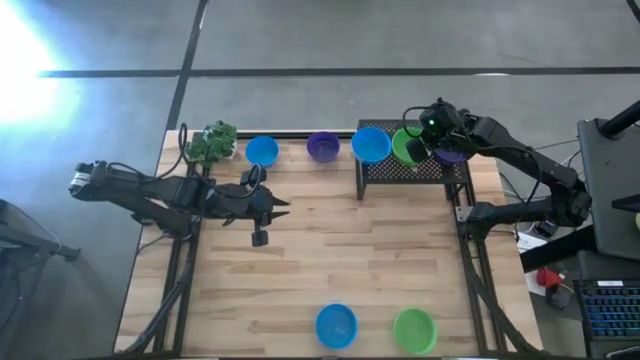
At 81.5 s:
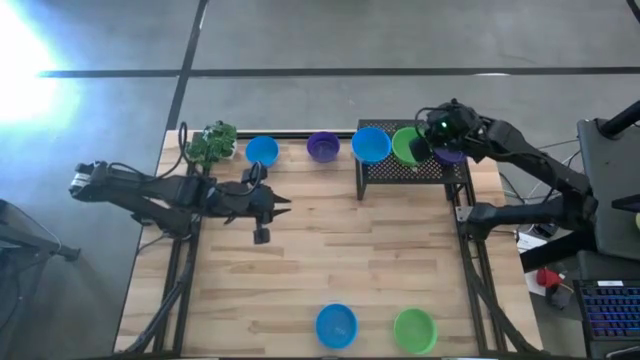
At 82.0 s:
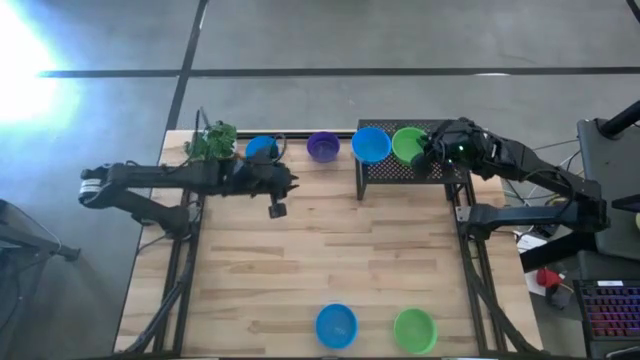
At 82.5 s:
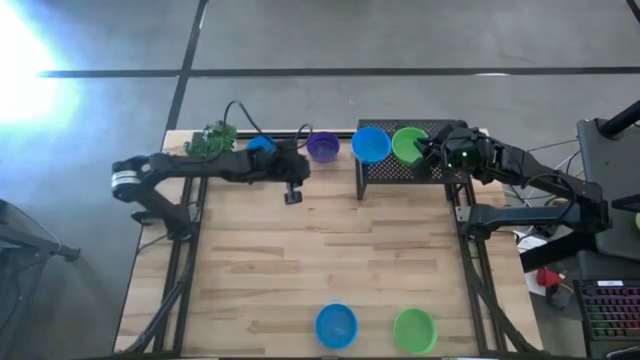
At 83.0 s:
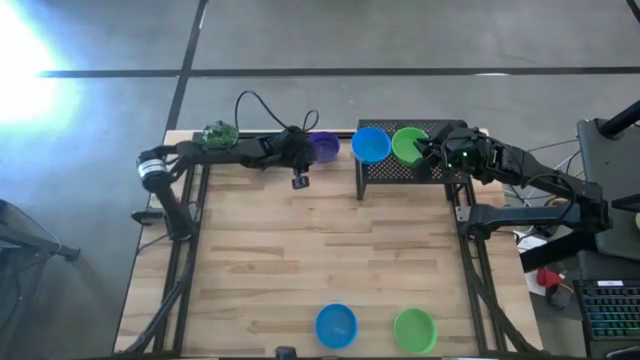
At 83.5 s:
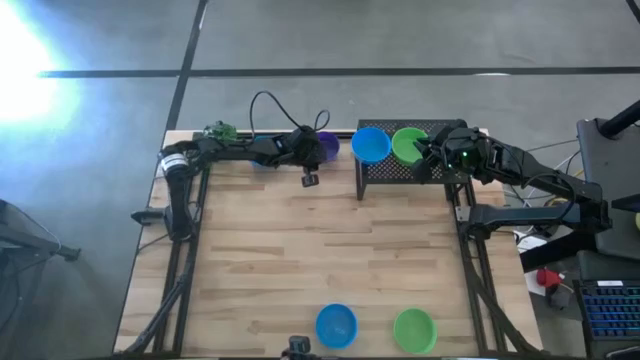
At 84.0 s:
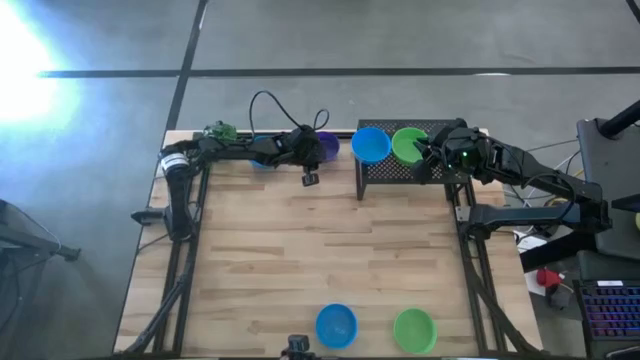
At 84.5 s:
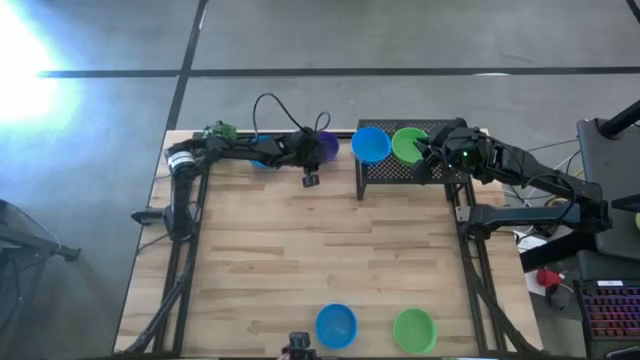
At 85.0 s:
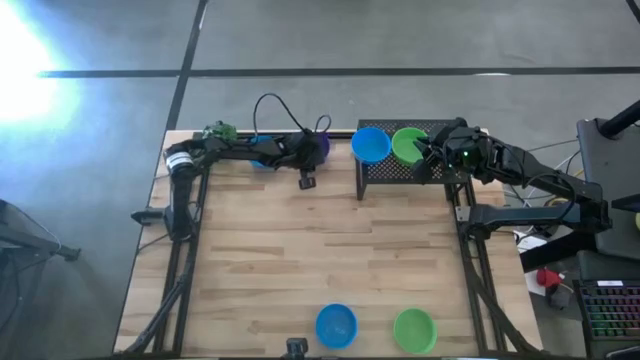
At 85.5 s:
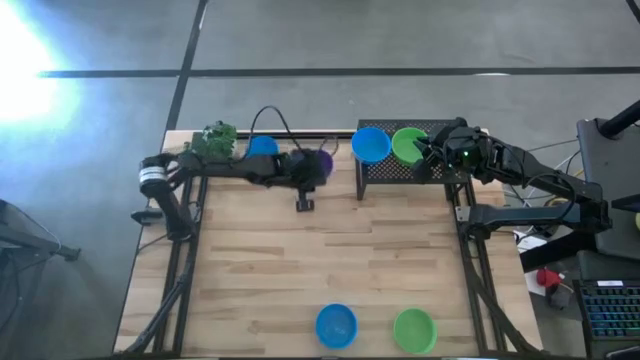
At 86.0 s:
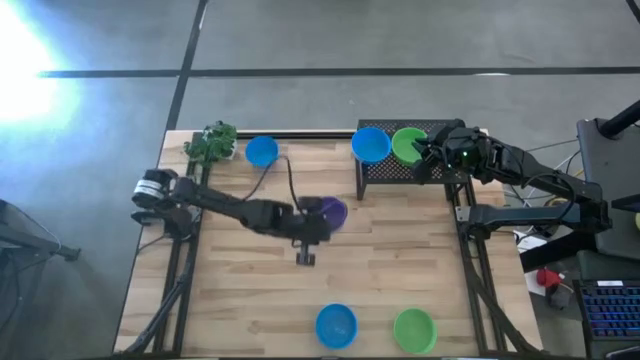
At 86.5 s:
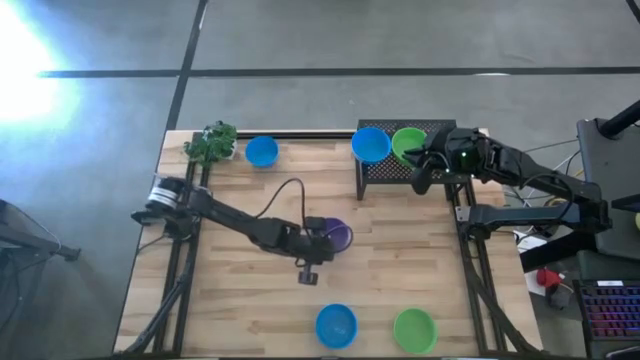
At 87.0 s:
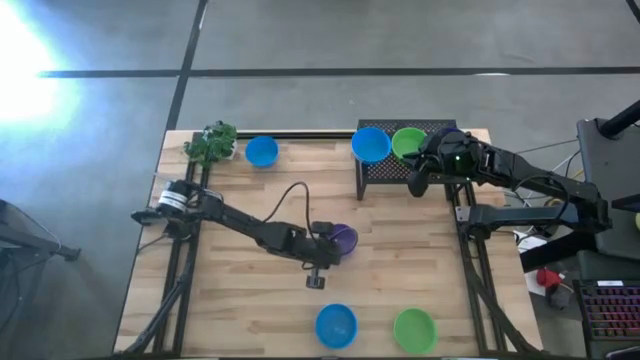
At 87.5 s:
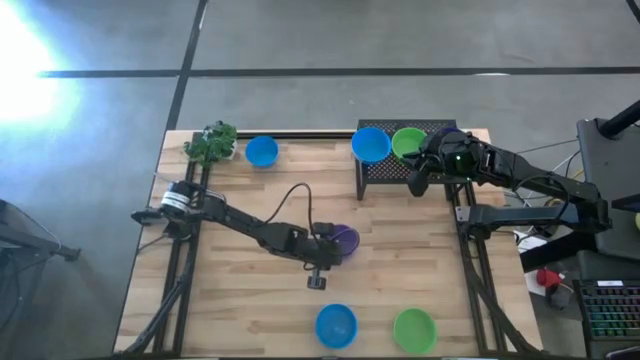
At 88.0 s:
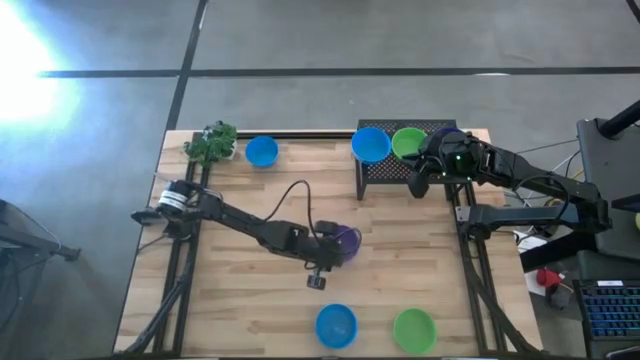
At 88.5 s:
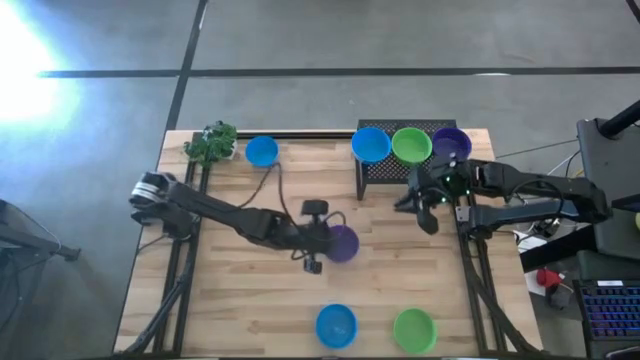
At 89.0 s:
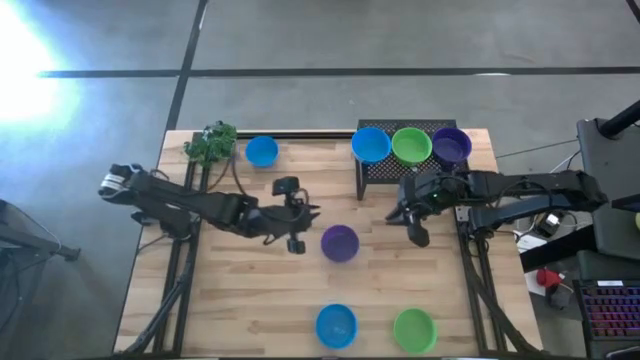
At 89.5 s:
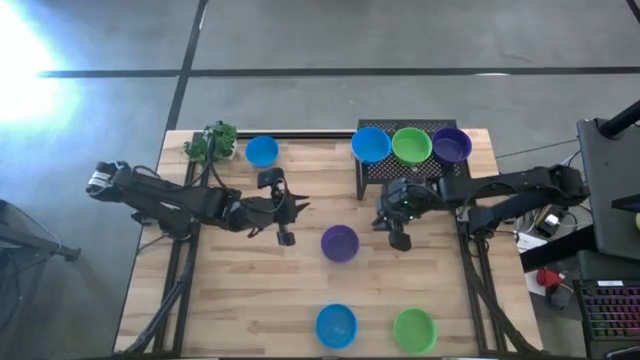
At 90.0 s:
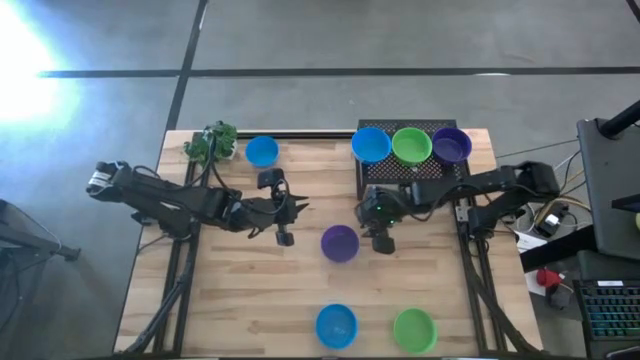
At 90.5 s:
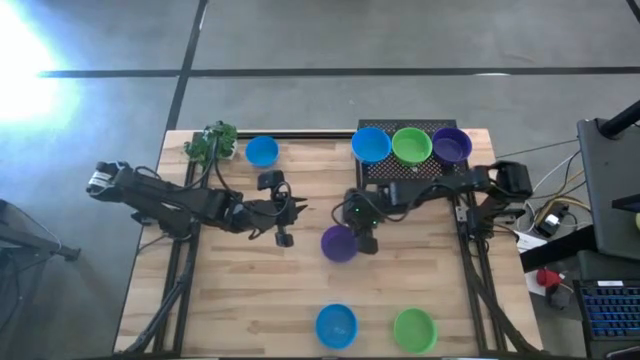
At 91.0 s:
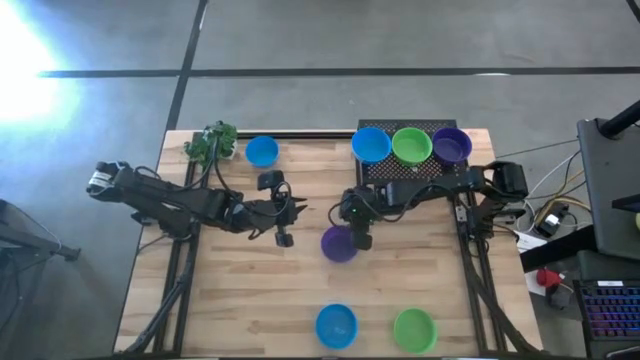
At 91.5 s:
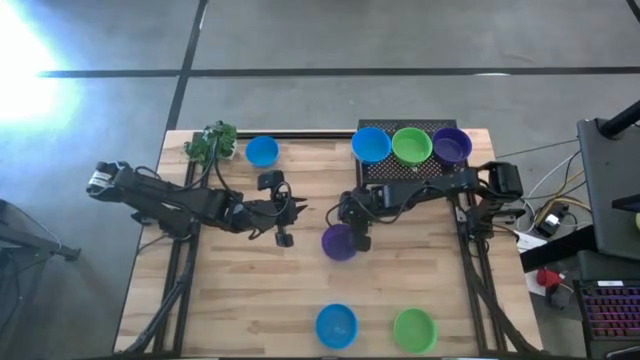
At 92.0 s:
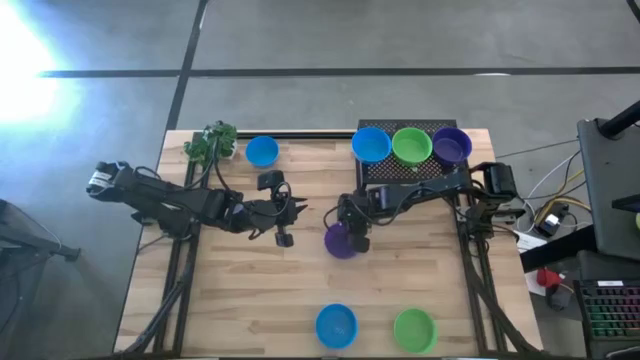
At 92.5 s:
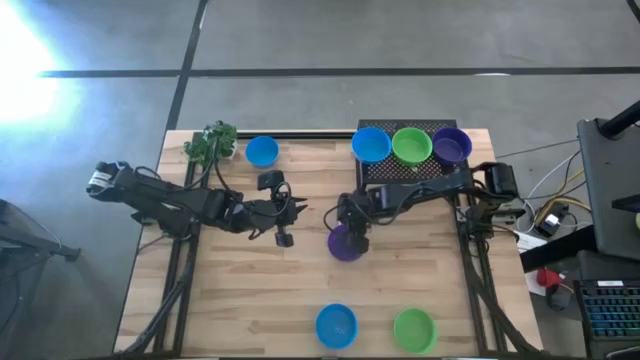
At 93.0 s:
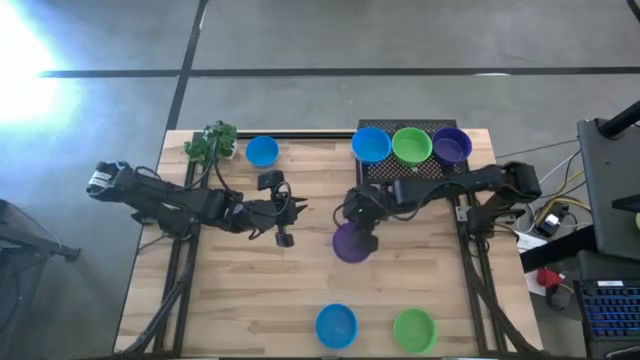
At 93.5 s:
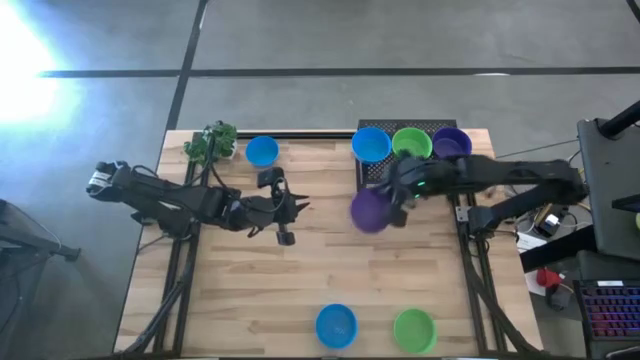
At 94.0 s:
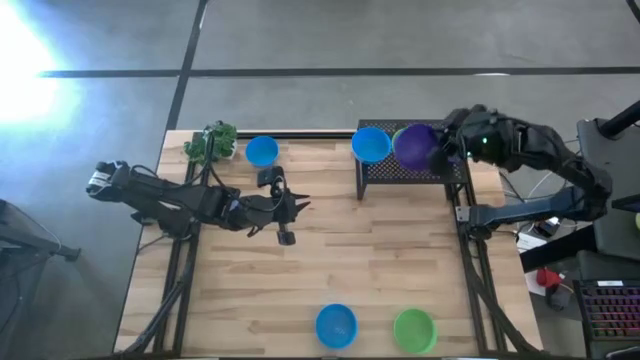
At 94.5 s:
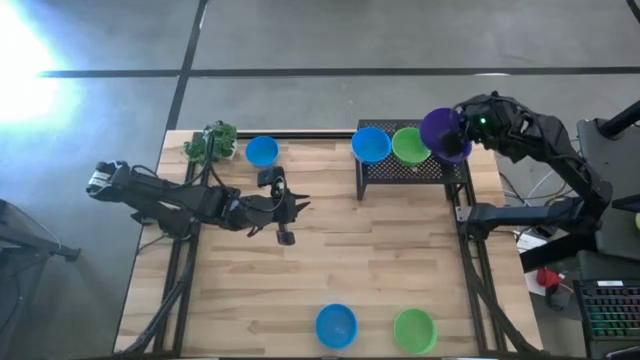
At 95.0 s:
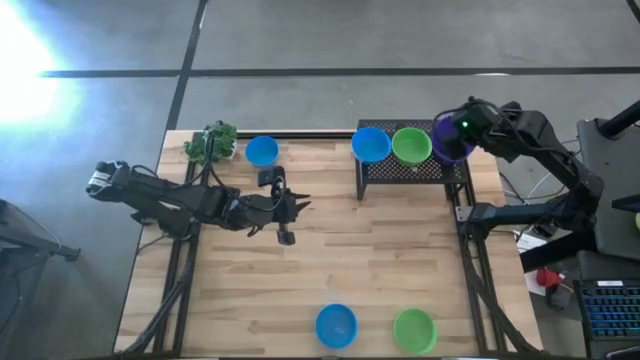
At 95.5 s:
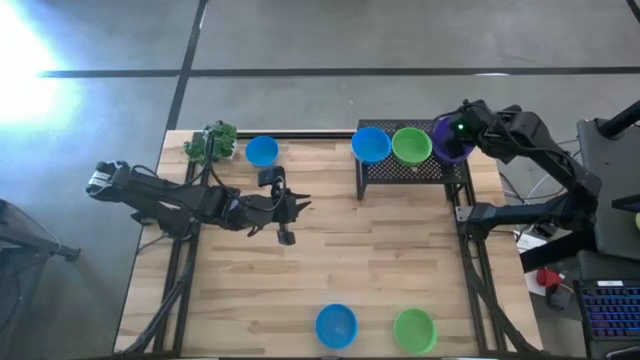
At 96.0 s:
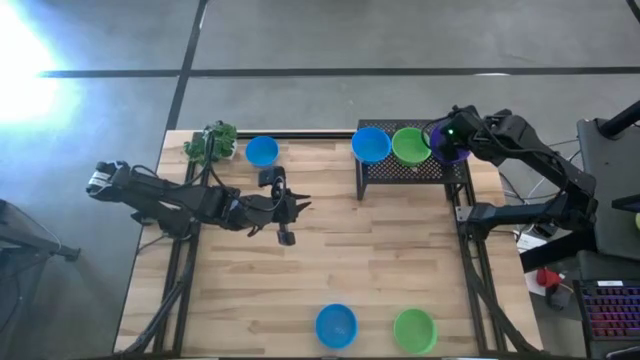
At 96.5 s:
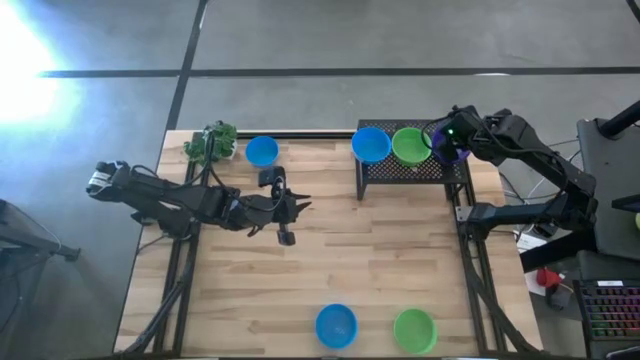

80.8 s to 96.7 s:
Task: Pick & Place Mini bowls
Stack the purple bowl on the stacked purple bowls on the shelf

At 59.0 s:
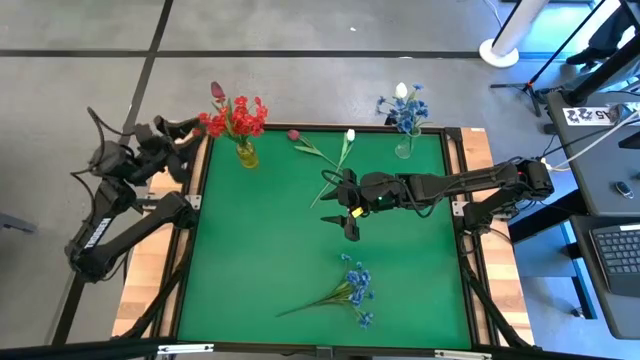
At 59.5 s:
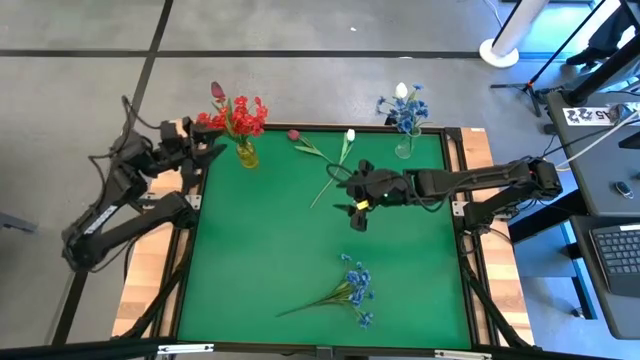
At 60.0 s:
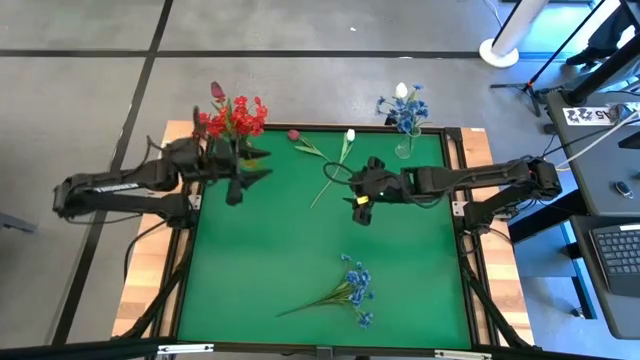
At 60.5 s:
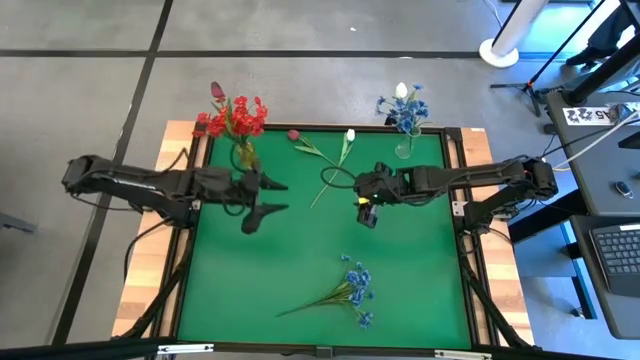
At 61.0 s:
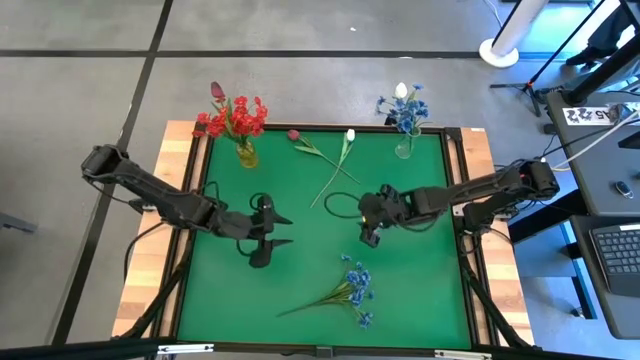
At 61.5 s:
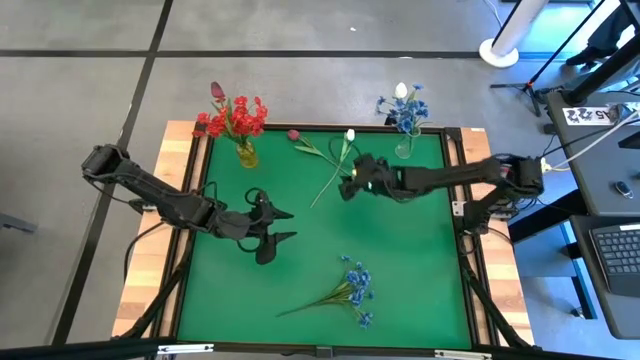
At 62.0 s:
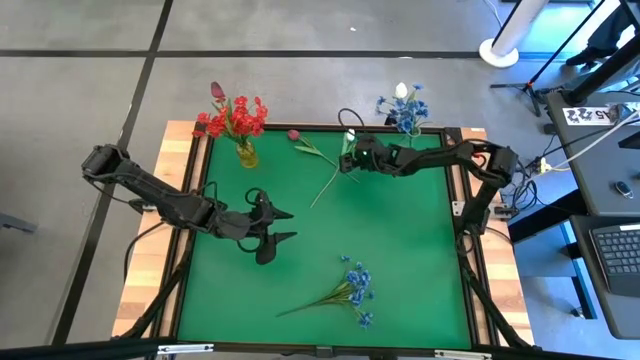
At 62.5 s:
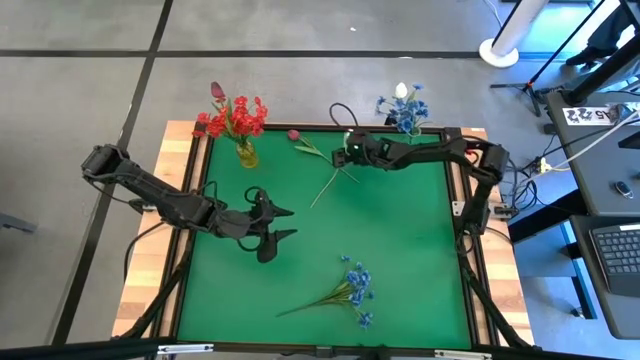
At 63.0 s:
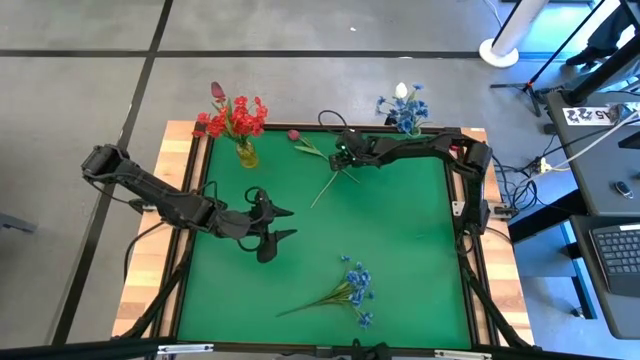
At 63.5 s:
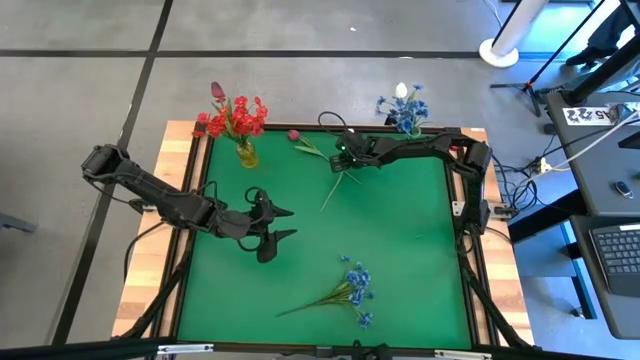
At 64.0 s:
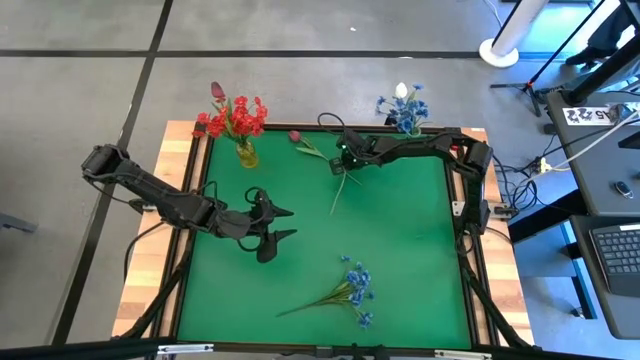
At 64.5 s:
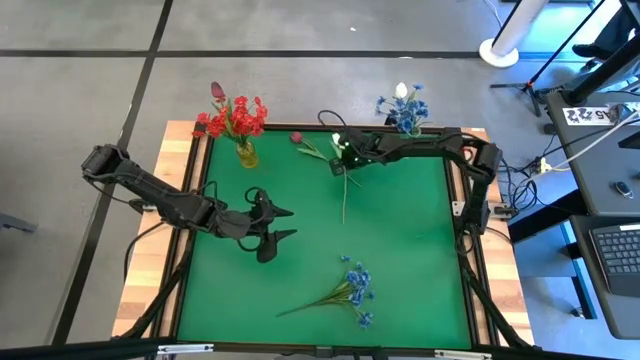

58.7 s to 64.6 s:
Task: Sort flowers into vase by color
Put the white flower into the transparent vase
